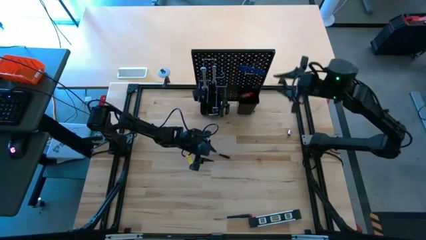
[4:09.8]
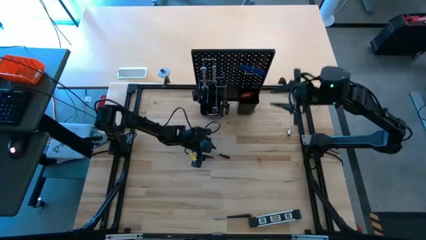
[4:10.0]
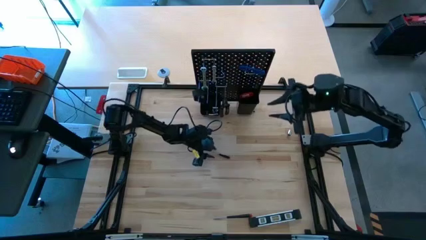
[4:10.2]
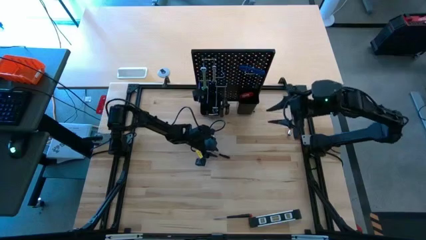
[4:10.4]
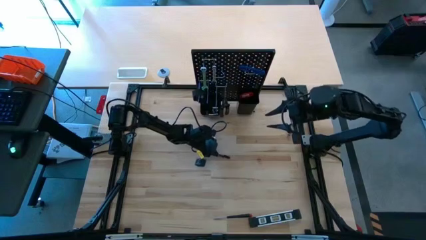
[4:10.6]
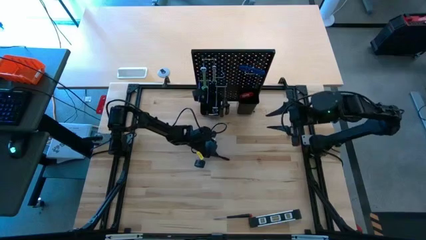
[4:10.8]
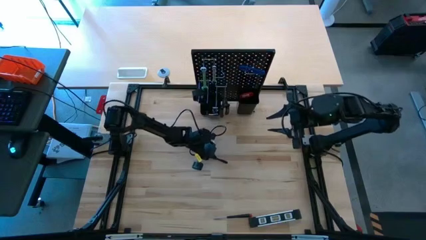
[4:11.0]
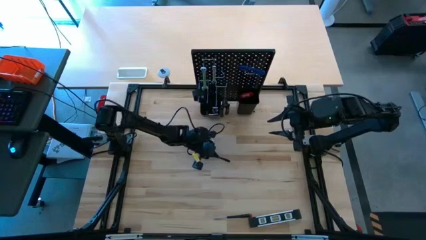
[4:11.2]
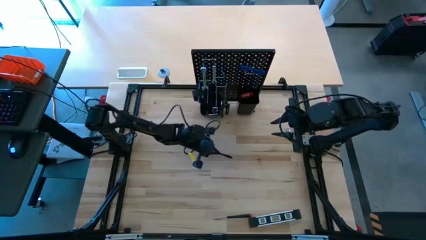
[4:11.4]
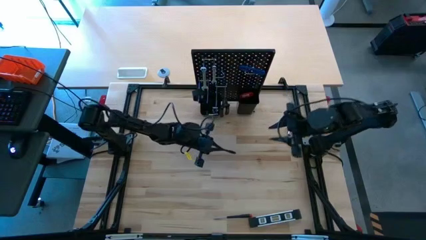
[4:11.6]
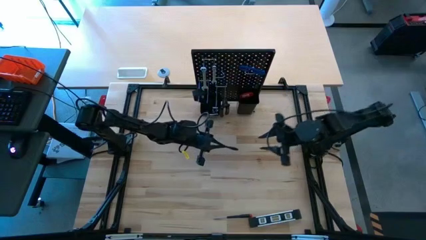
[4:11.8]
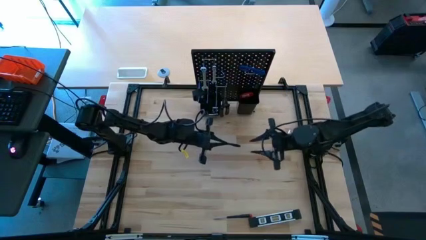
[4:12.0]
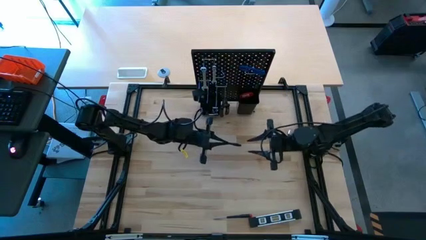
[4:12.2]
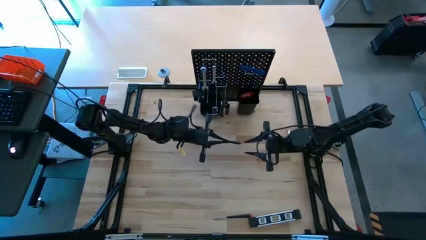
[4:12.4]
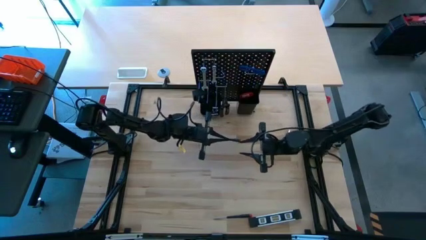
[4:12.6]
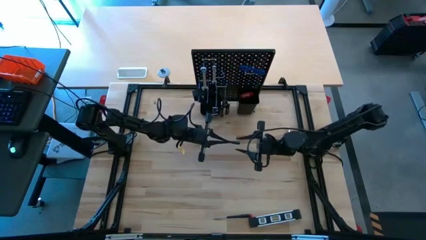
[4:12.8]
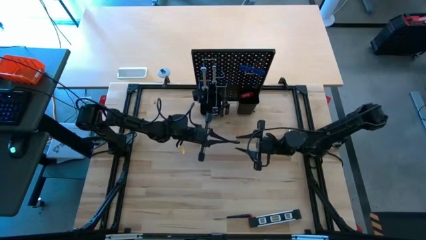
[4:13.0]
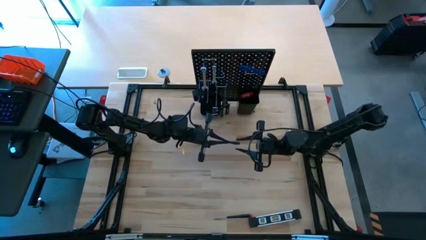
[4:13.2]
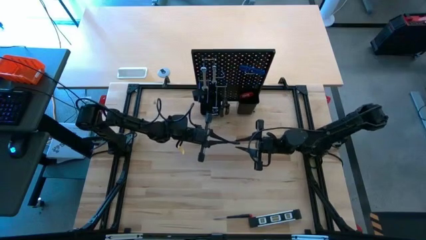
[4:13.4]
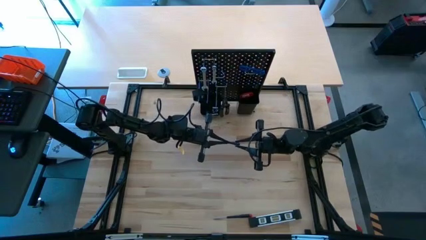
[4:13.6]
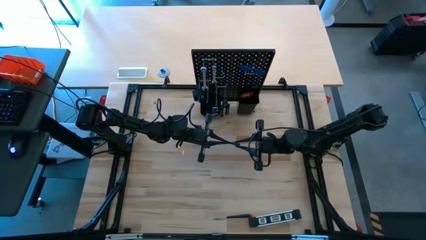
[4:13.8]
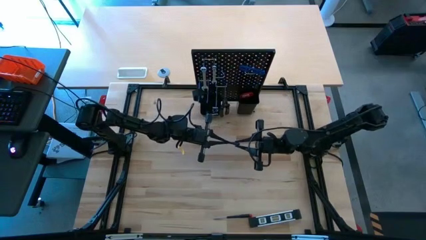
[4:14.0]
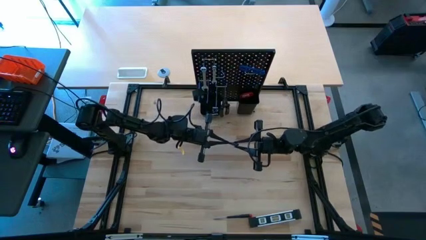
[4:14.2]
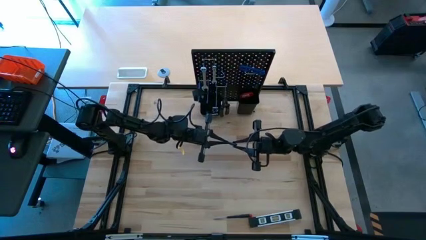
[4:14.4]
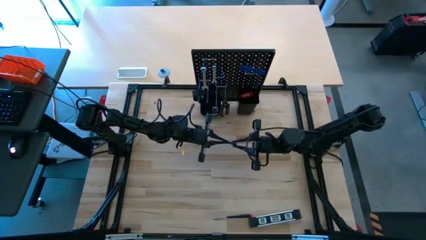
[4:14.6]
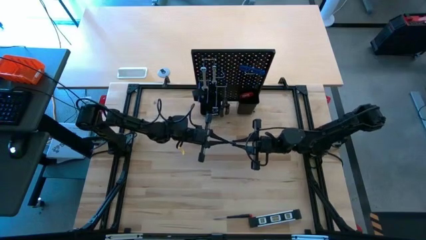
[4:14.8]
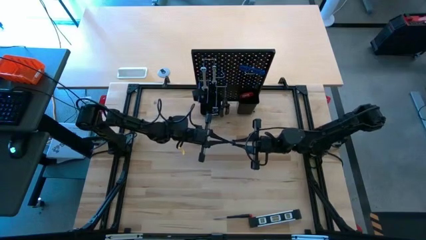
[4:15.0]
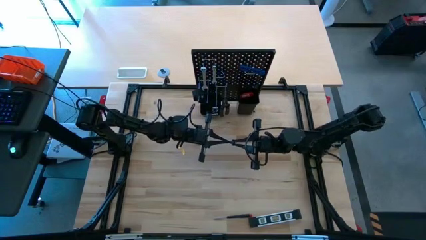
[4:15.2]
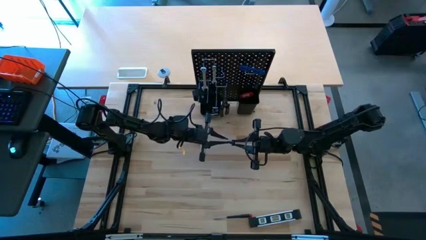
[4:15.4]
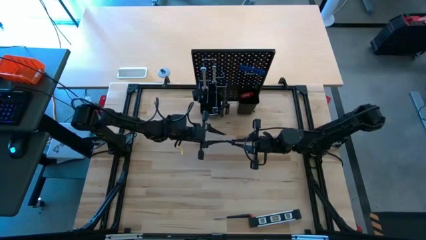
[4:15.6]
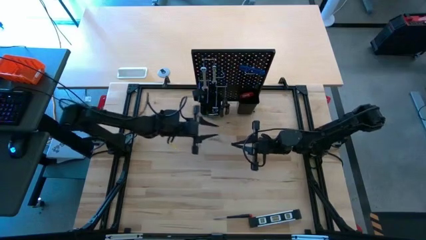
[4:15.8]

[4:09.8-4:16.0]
Task: Hang tools onto peg board
Put the nut driver into the left bin on the pegboard

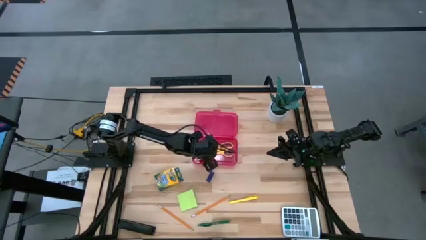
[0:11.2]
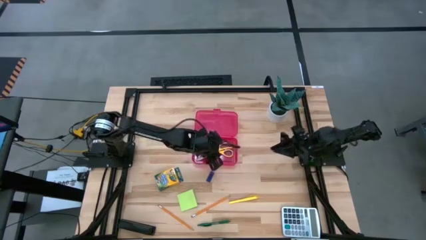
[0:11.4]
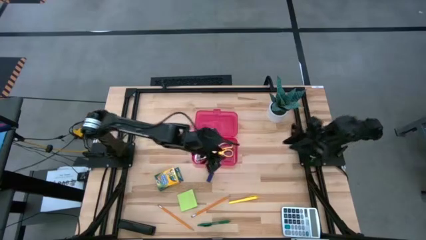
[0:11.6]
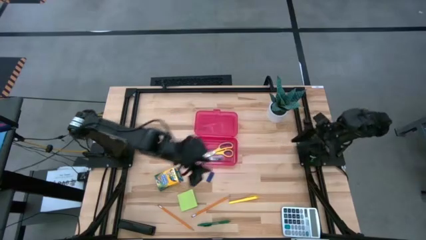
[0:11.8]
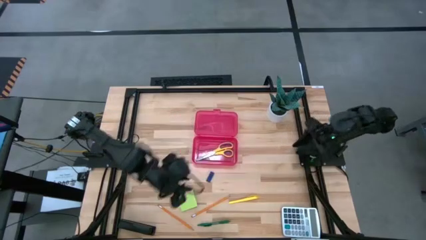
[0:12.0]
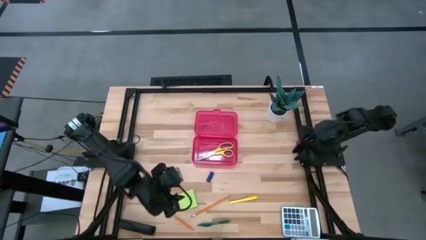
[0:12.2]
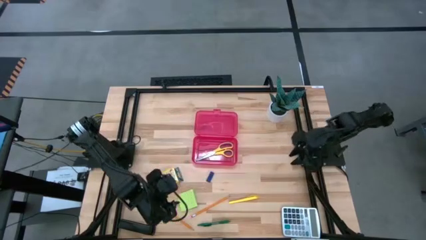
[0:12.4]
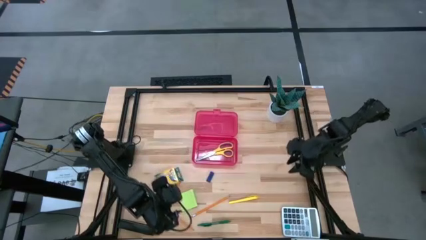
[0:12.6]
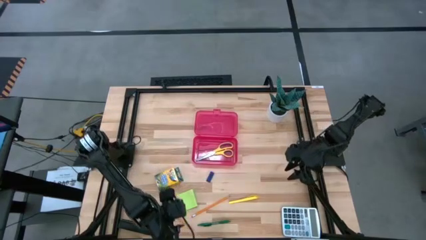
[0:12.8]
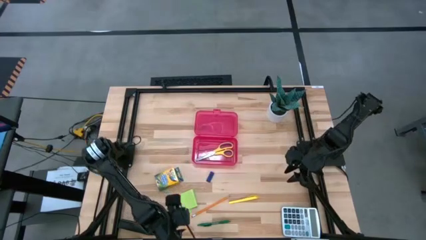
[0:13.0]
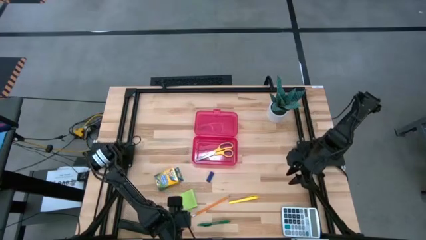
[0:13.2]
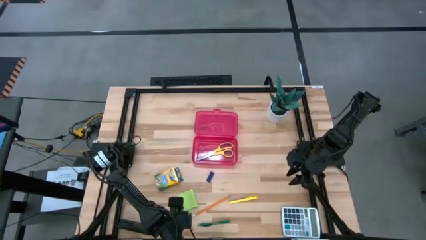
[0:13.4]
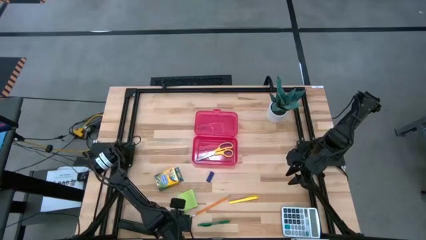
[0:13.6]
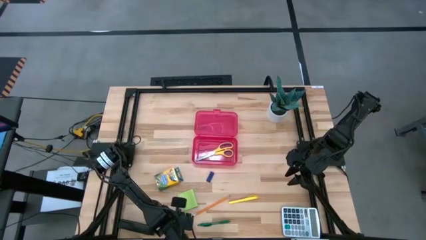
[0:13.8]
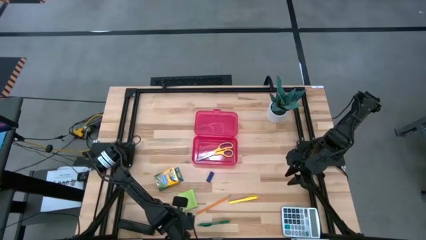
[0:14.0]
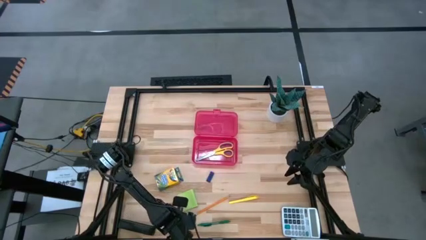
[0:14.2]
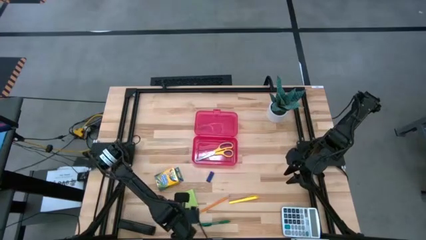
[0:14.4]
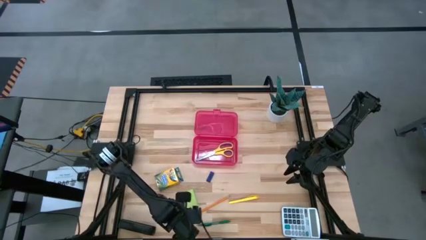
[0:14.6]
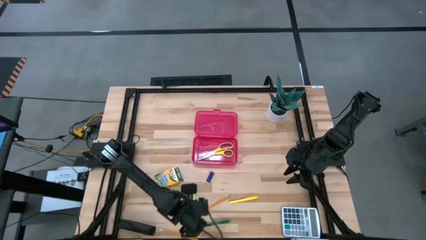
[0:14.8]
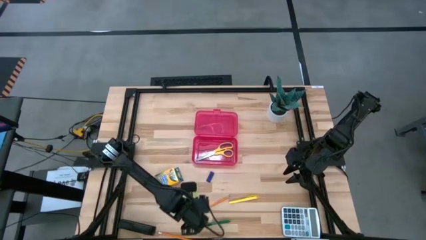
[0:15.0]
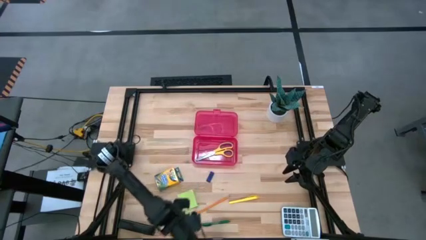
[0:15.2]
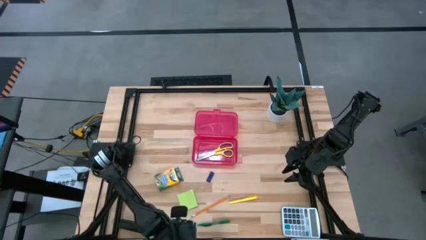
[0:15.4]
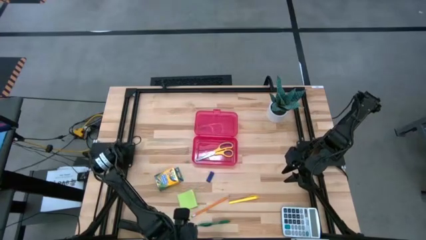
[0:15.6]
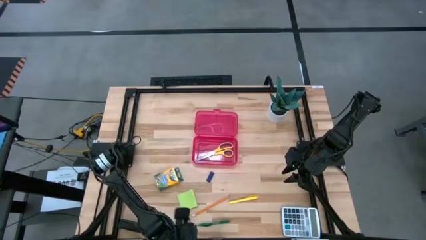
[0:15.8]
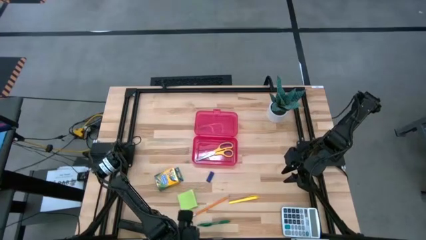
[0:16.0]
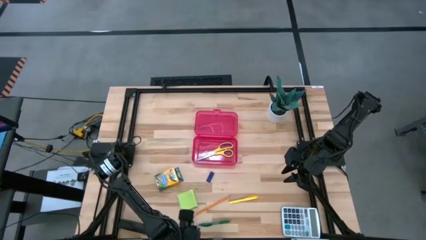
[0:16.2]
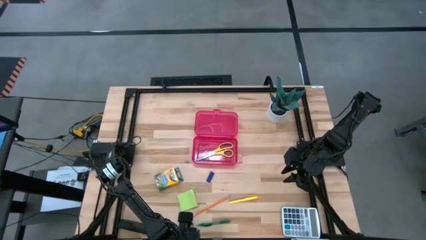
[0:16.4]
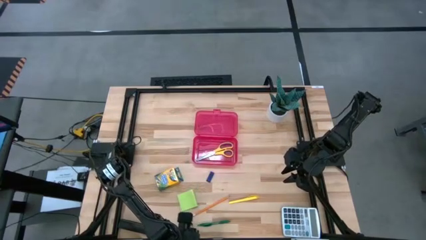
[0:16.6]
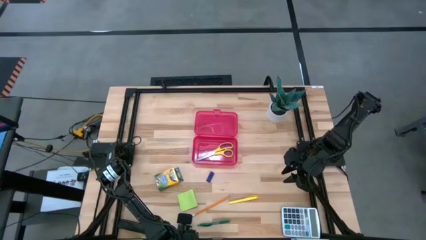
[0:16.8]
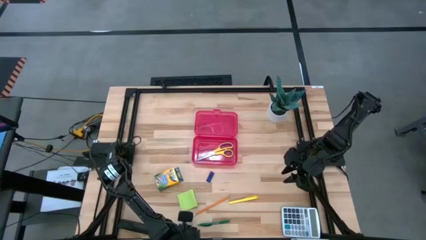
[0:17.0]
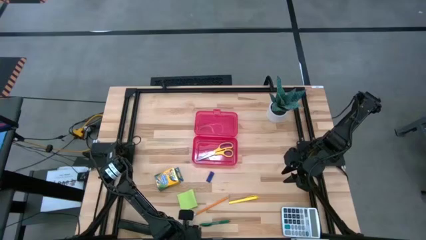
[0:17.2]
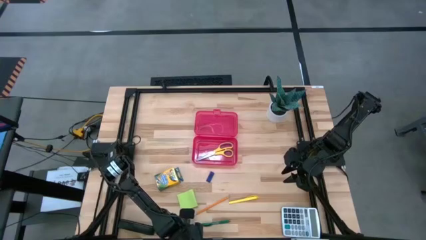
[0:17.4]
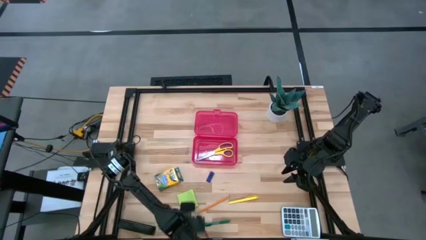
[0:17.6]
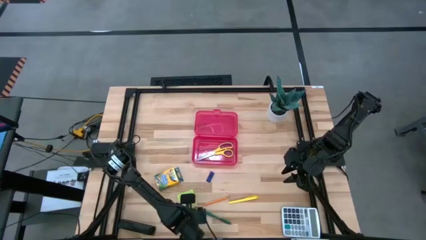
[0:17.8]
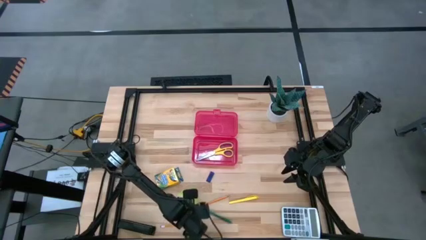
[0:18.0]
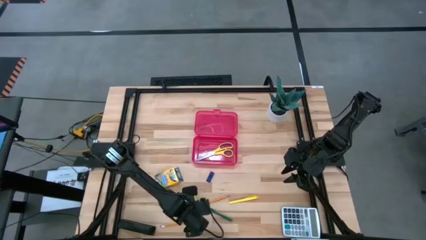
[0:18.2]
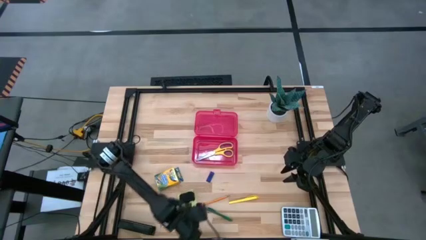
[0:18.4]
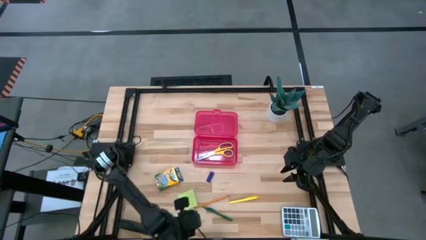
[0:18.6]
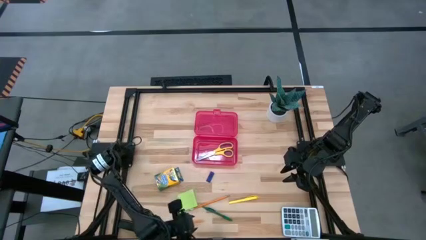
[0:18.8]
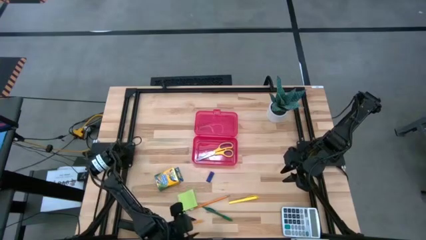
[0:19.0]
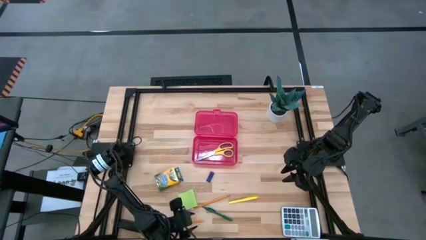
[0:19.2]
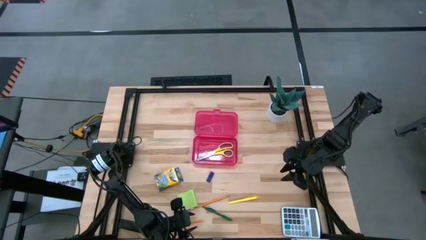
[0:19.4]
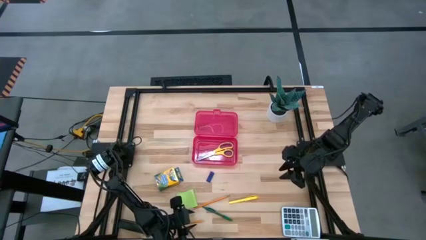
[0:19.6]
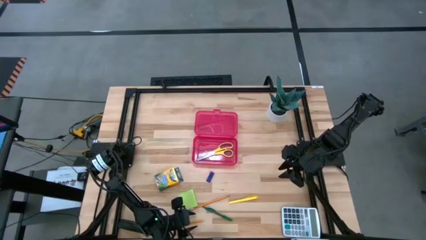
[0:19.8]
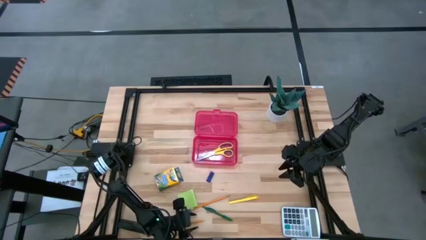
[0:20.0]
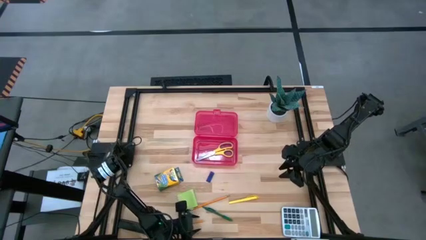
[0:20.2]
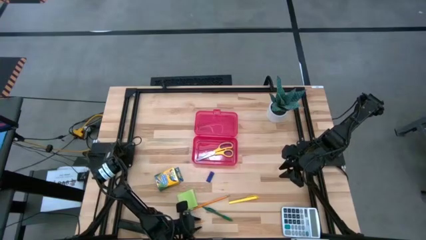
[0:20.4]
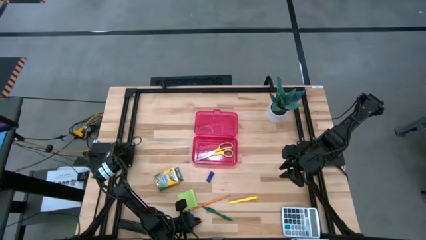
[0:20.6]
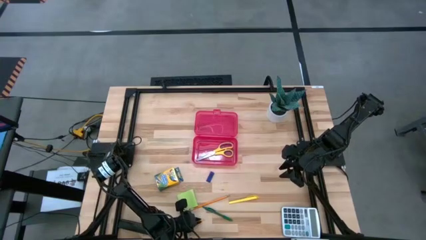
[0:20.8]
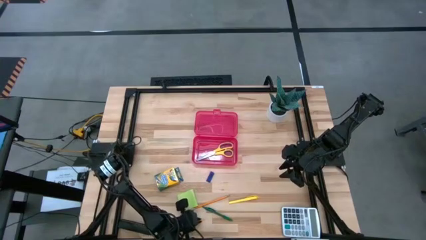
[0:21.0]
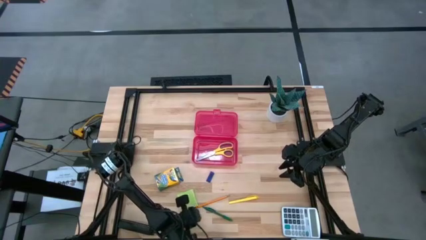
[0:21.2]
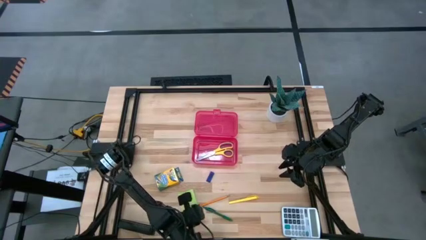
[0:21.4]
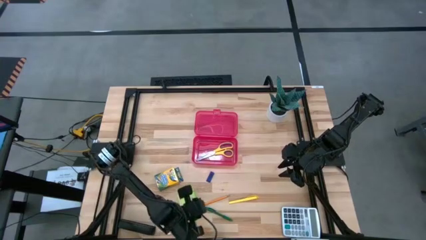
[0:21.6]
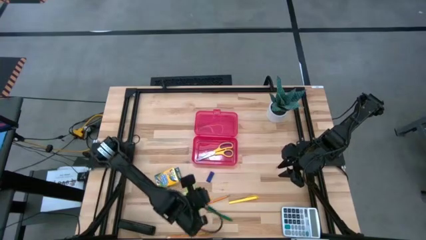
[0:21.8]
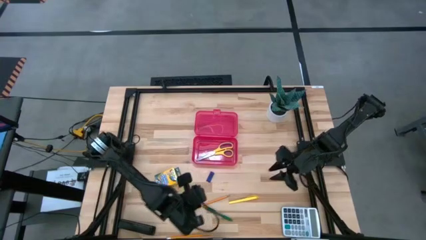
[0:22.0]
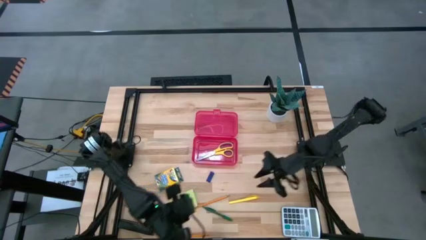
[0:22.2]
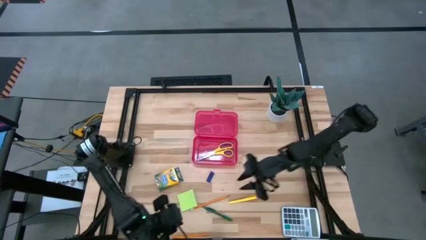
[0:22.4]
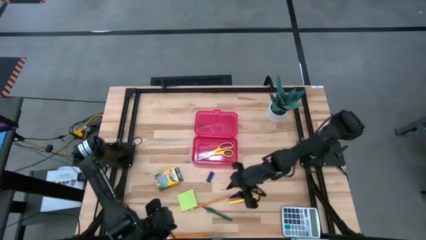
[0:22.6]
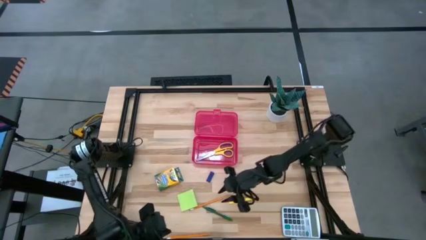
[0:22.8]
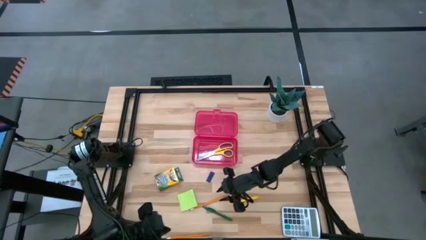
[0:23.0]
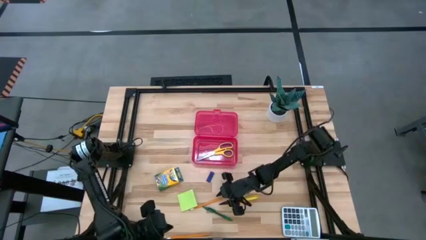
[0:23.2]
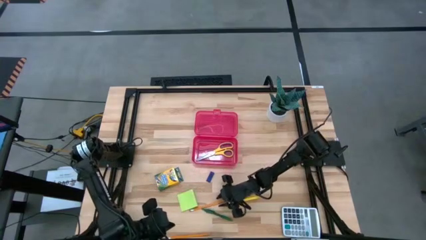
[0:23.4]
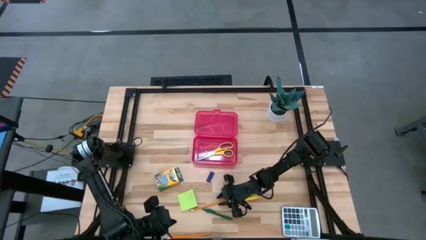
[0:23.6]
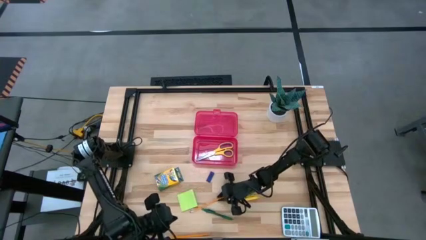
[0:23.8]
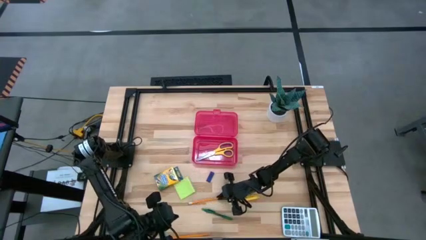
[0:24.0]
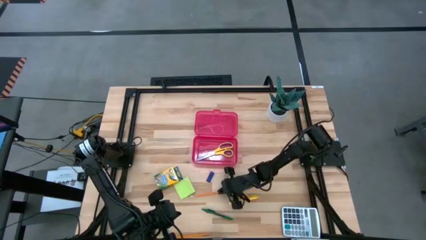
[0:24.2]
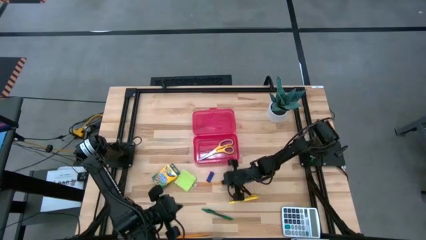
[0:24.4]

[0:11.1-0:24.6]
Task: Pack school essentials
Put the left orange pencil into the supply box
